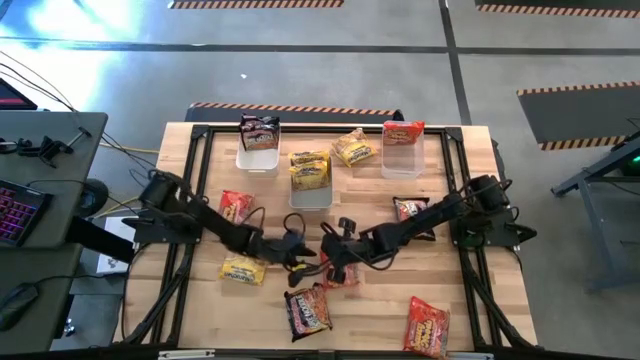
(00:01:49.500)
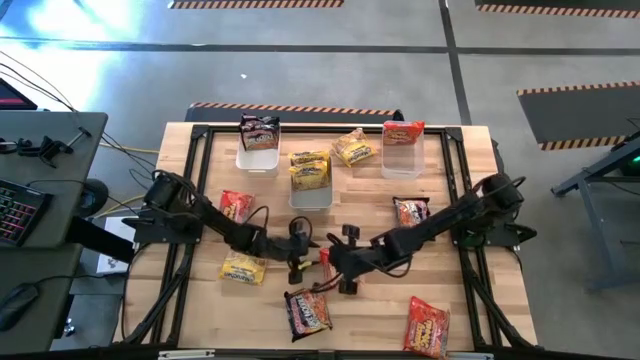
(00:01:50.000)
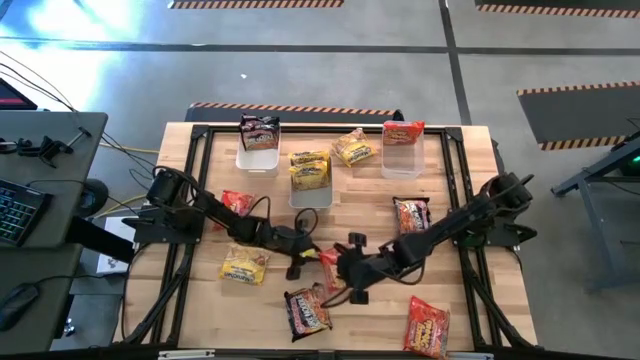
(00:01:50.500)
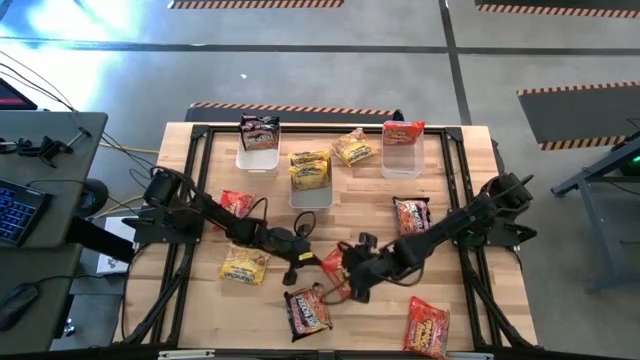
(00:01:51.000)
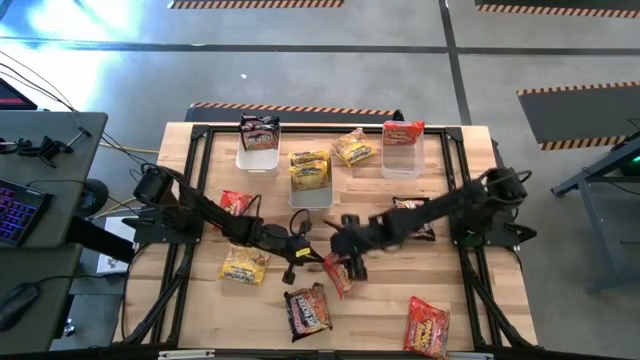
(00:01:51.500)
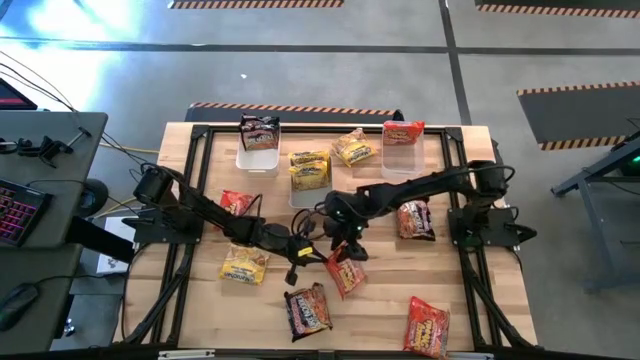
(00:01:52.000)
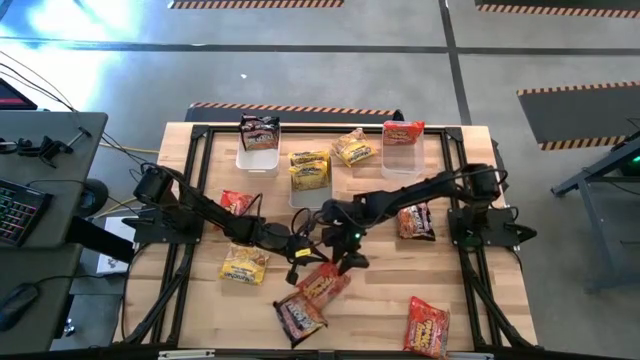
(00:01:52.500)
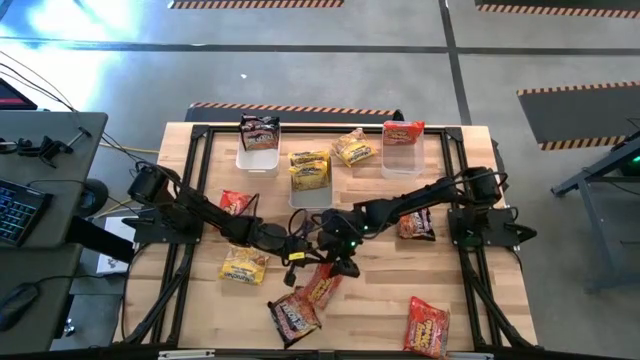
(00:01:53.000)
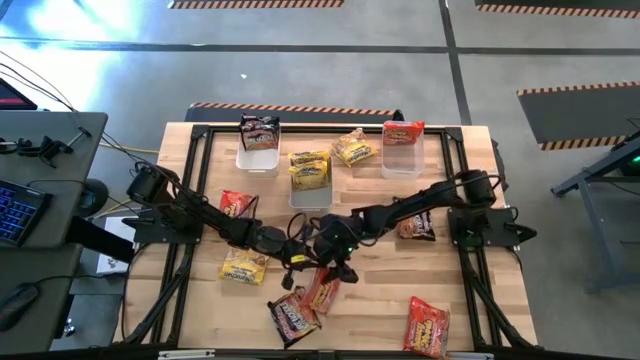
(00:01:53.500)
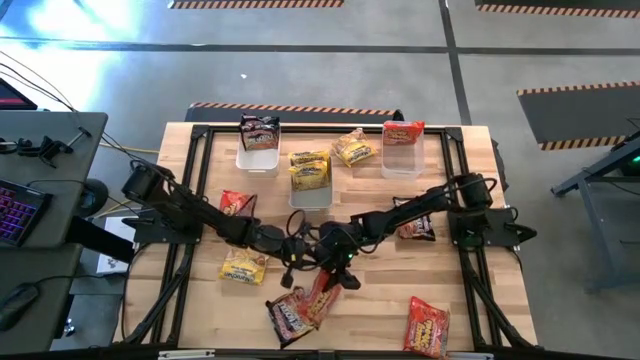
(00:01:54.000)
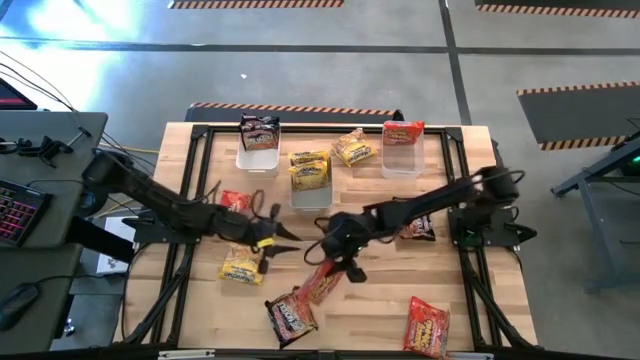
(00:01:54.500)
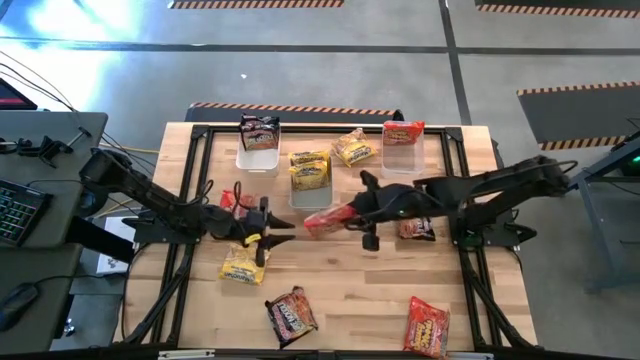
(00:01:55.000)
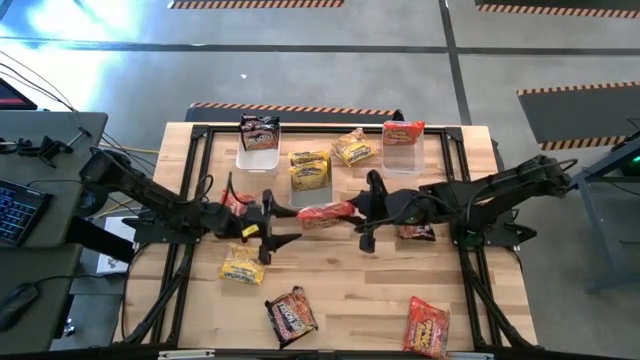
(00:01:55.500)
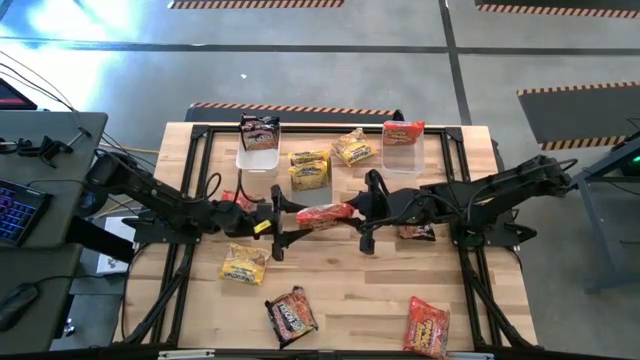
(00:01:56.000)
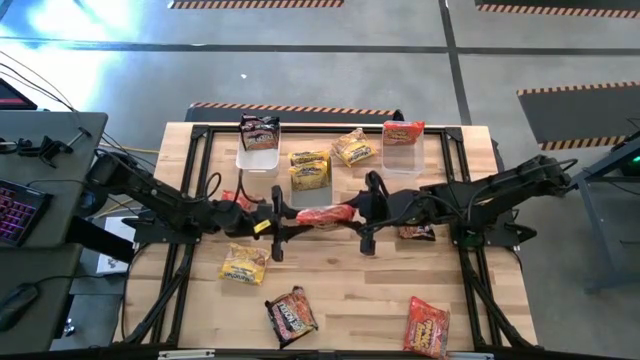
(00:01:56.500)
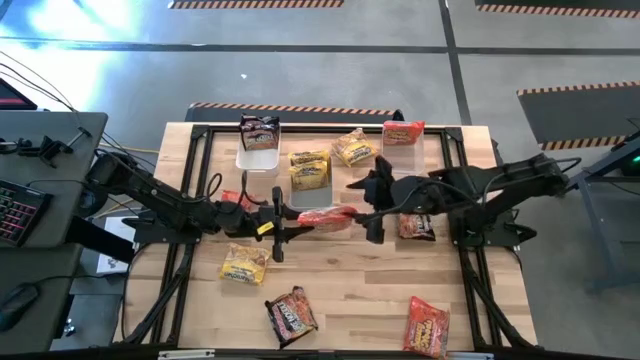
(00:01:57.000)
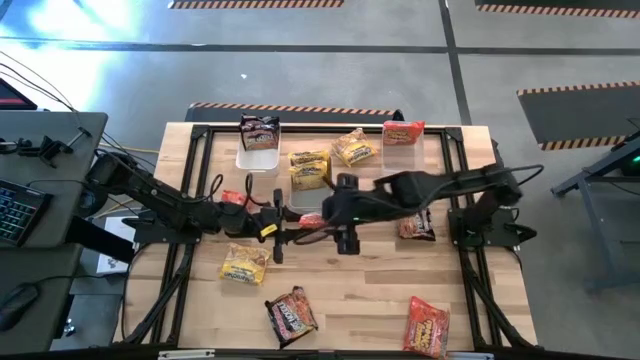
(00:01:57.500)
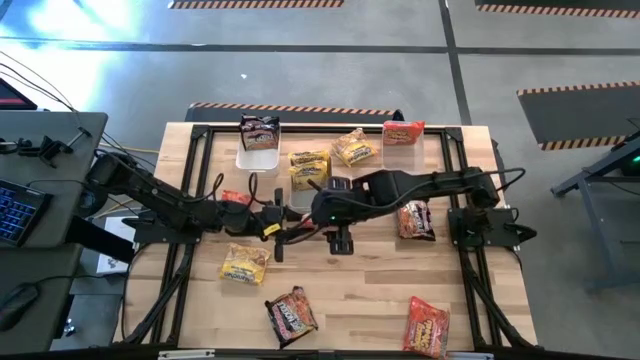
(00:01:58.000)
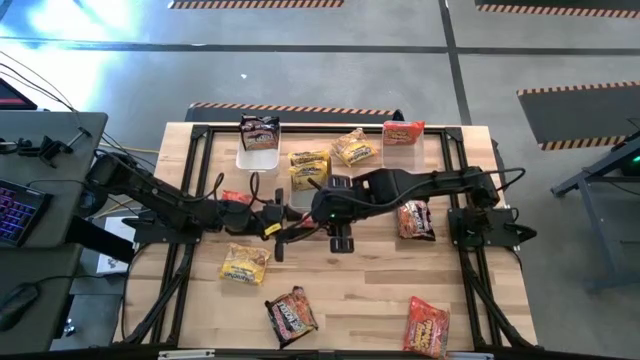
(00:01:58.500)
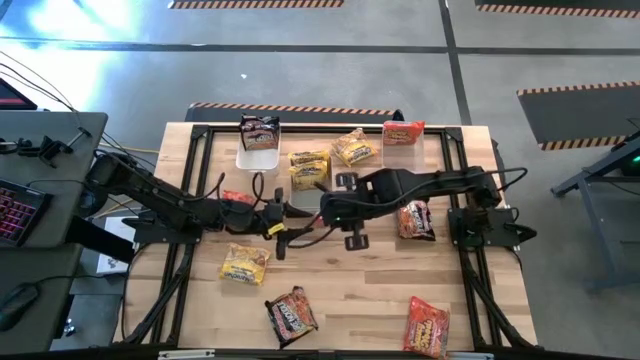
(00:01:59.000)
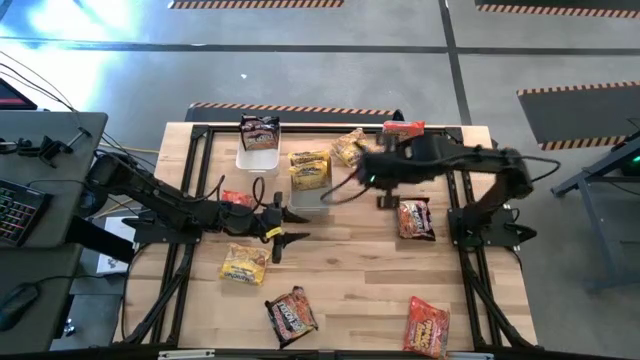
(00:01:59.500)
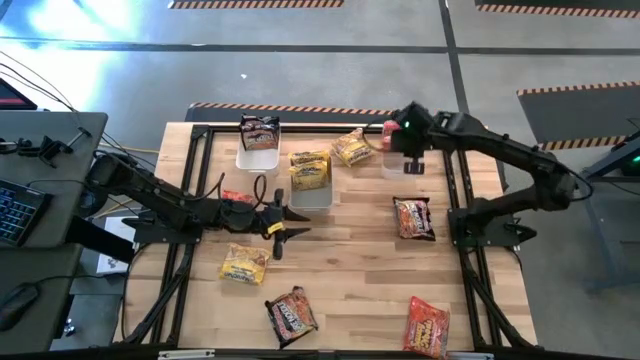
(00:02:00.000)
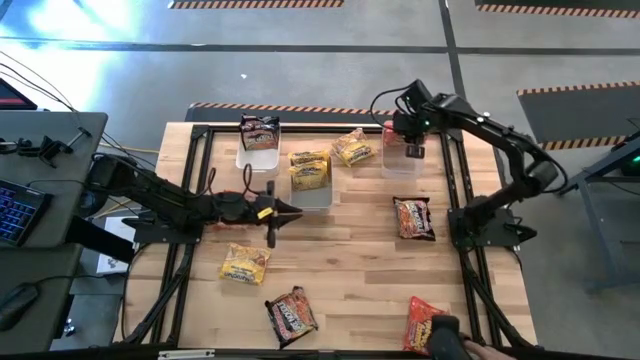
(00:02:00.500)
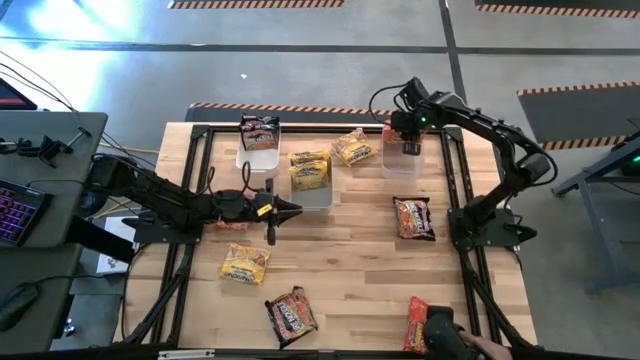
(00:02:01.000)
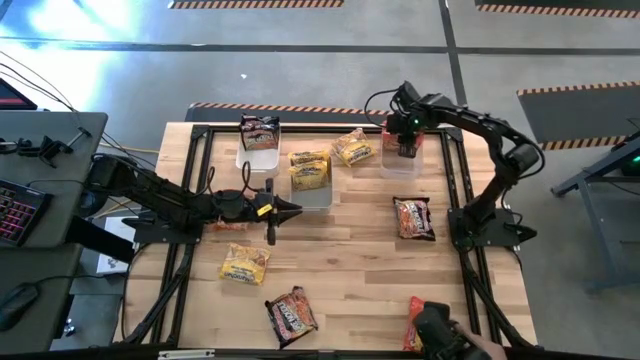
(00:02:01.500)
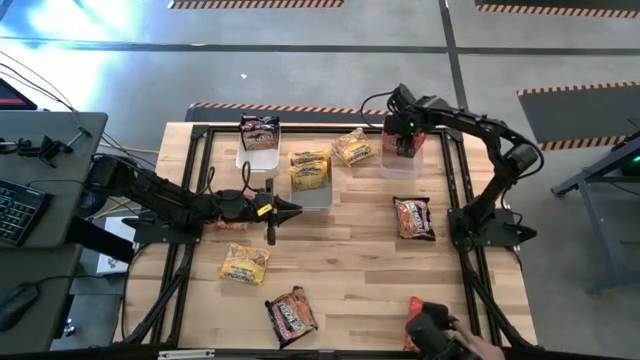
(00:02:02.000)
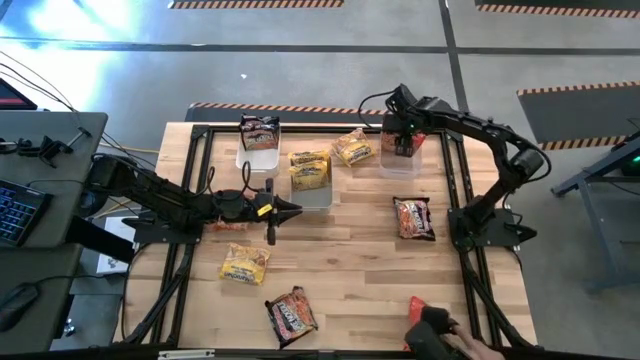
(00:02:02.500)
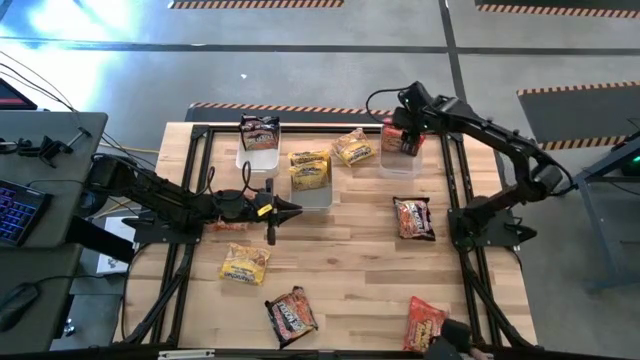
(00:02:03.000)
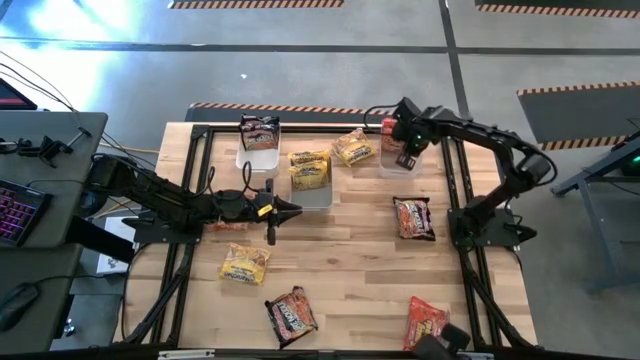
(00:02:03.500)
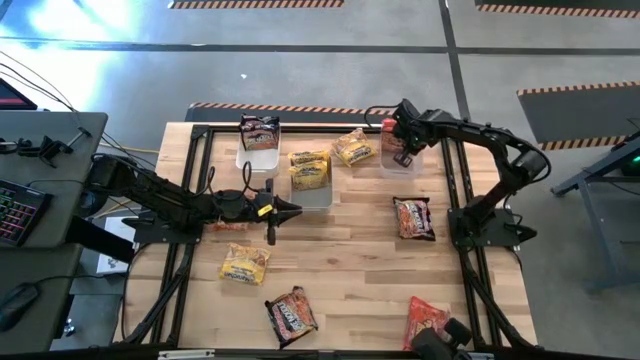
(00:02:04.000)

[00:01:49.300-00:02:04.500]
Task: Sort Maruchan noodles
Put the bottom left orange noodle pack into the transparent bin

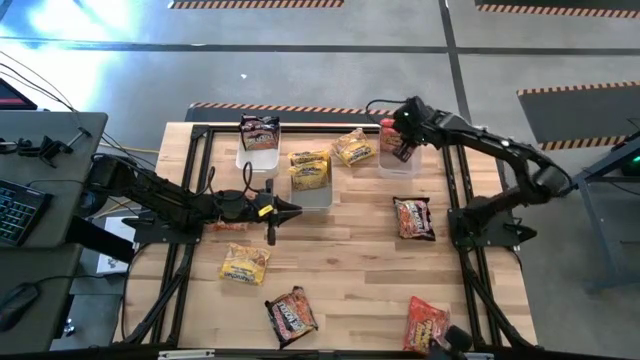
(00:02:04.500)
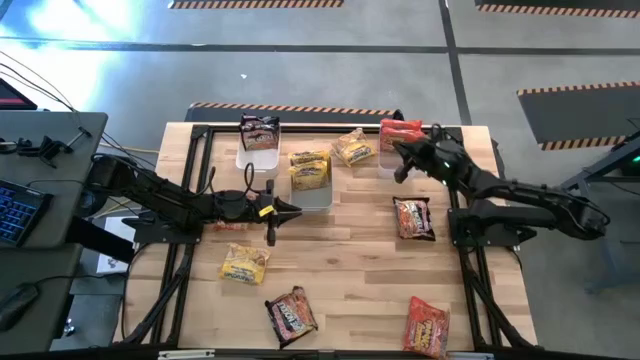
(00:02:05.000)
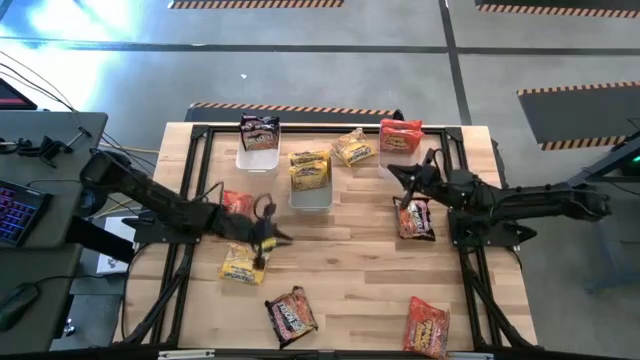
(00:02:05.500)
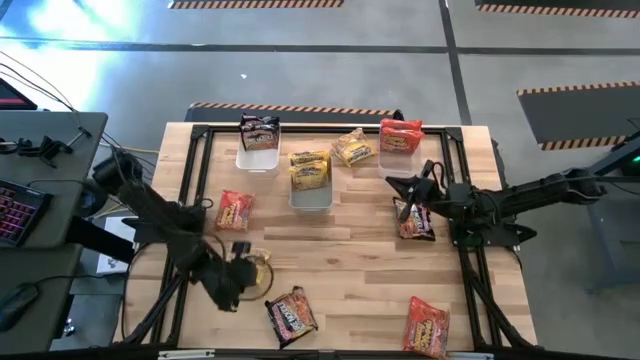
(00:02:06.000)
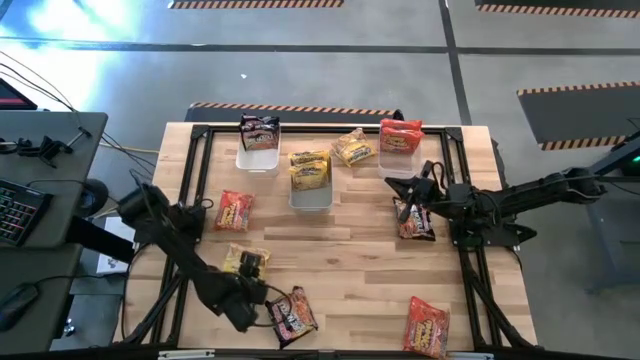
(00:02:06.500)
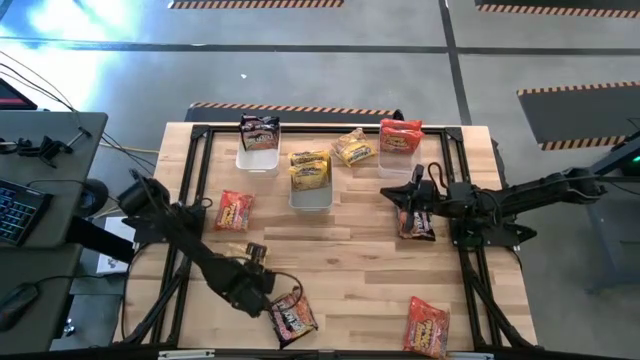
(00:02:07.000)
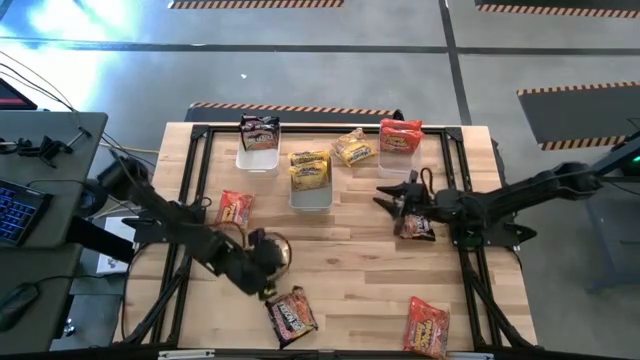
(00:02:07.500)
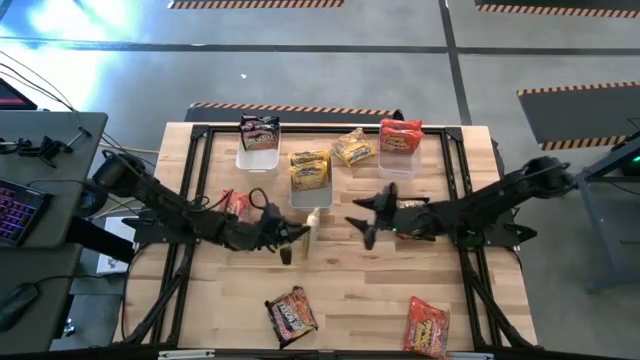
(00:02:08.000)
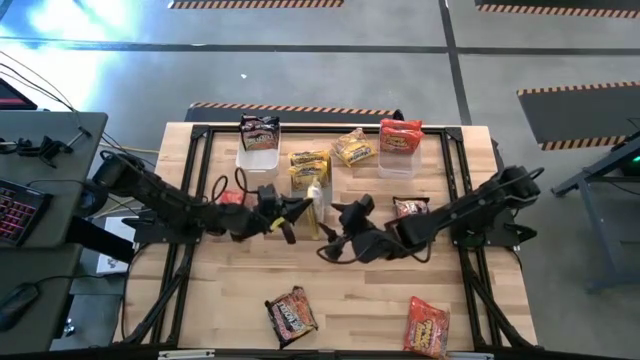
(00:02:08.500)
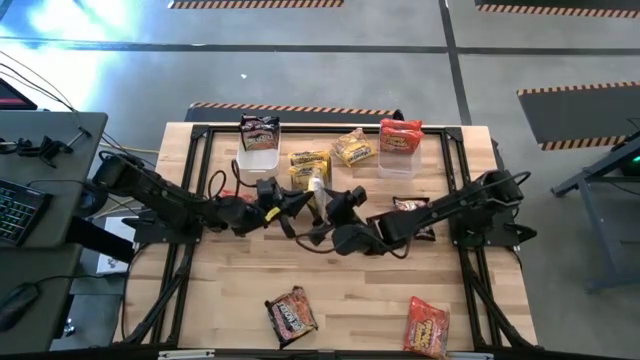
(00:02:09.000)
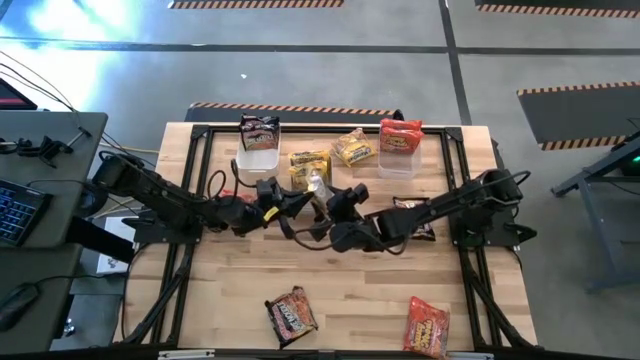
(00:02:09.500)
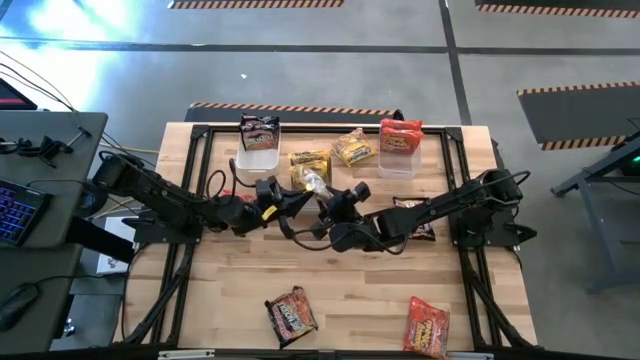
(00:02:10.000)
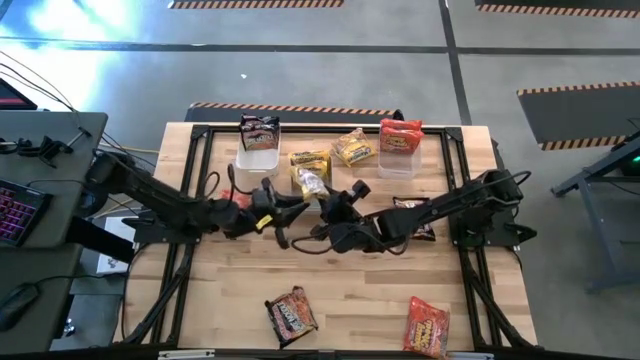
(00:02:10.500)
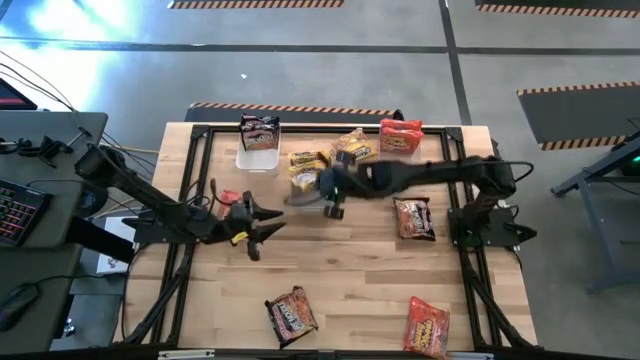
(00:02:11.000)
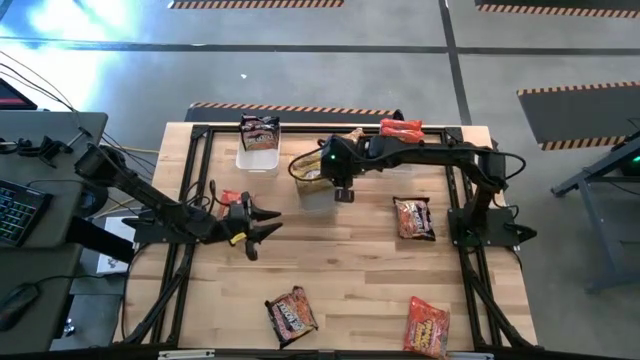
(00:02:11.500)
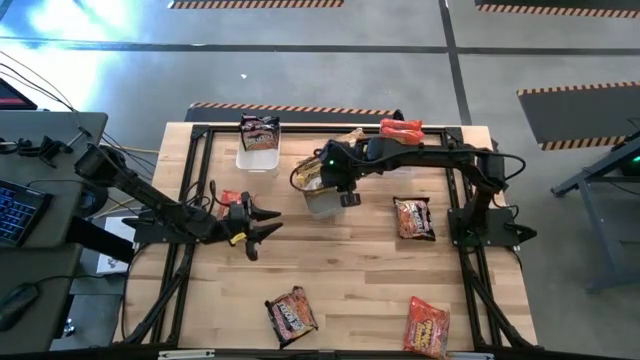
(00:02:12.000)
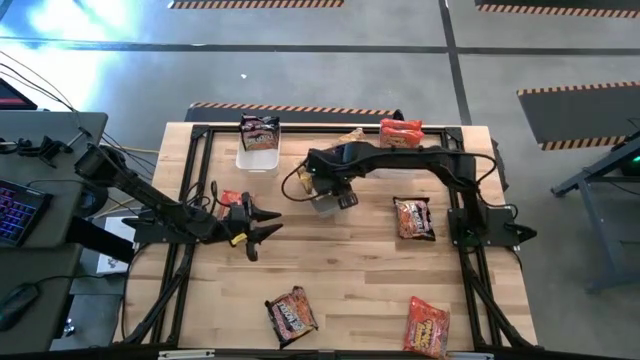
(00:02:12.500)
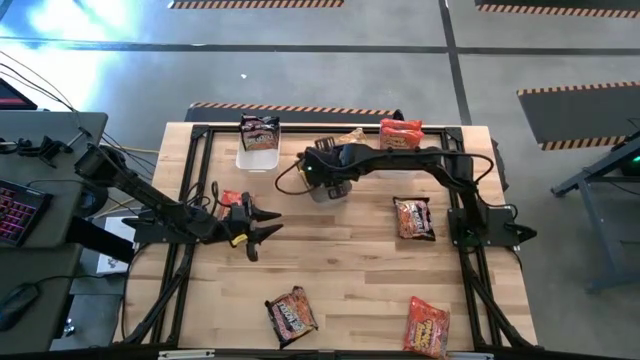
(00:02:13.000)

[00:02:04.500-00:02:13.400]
Put the bottom yellow noodle pack into the gray bin
